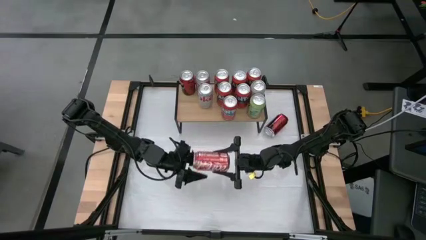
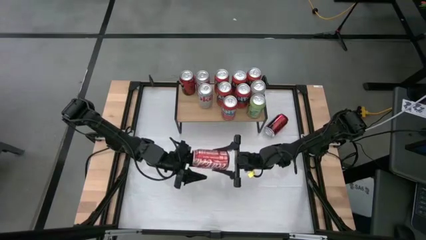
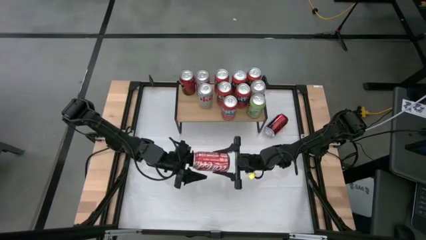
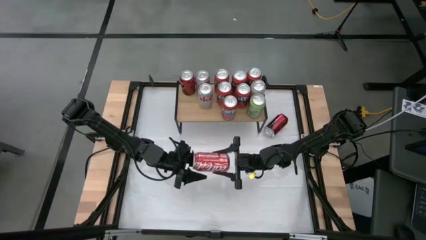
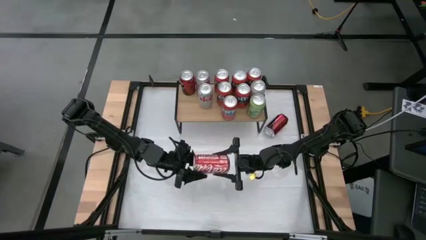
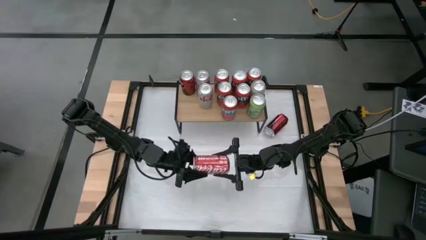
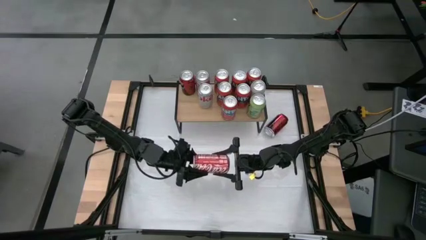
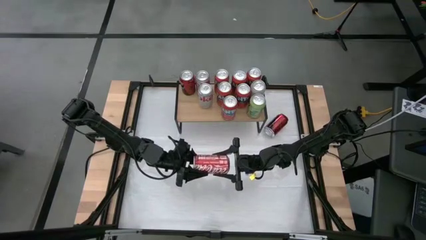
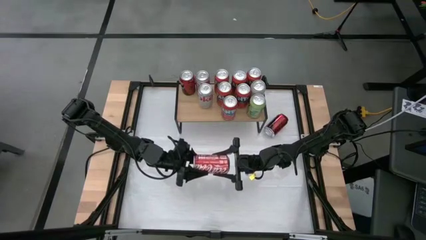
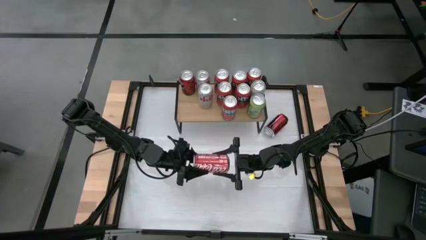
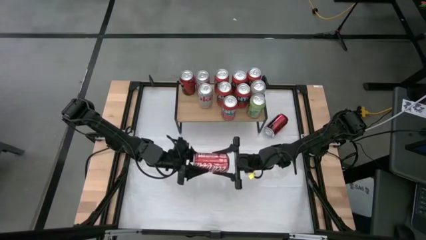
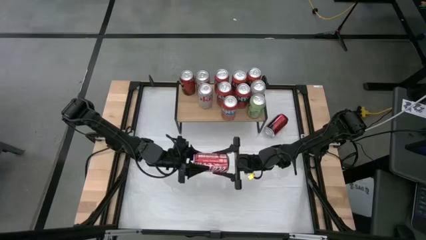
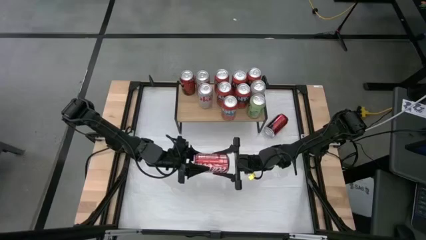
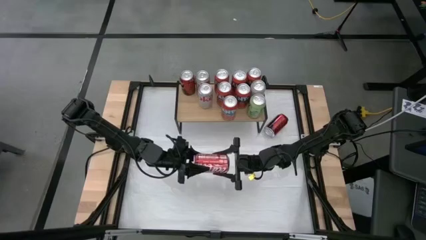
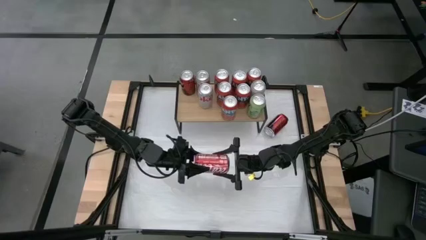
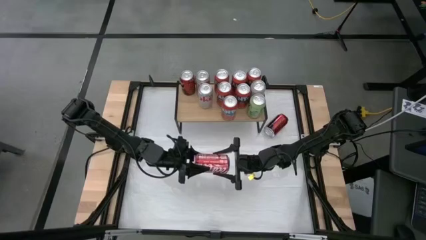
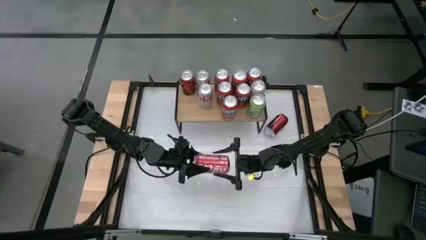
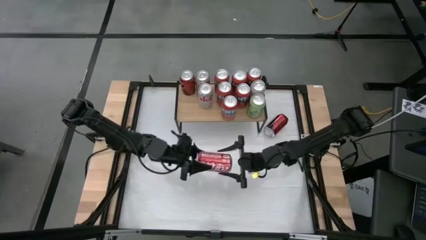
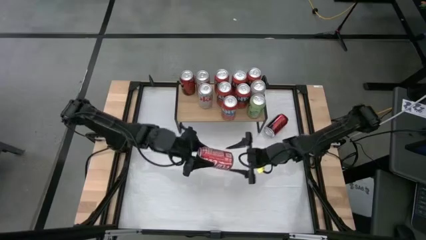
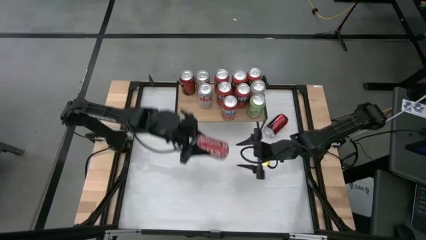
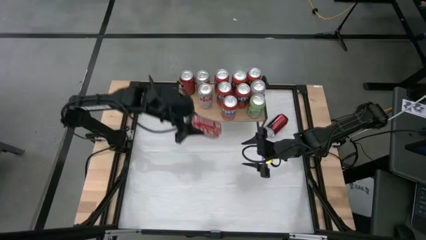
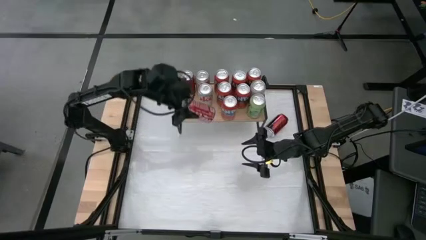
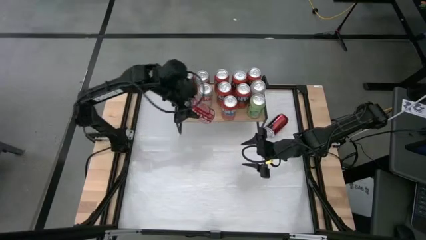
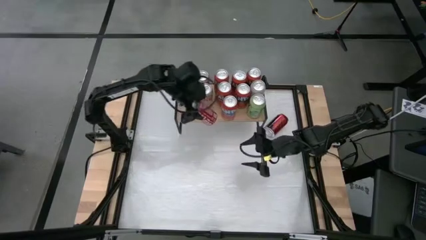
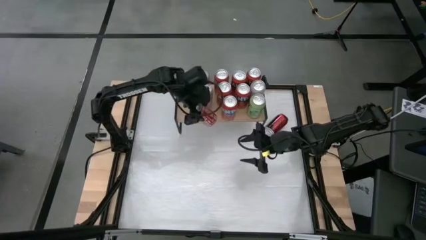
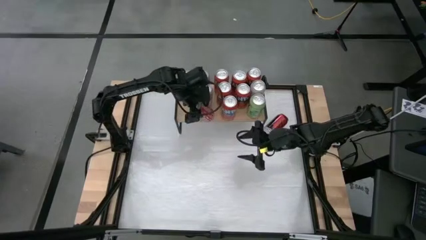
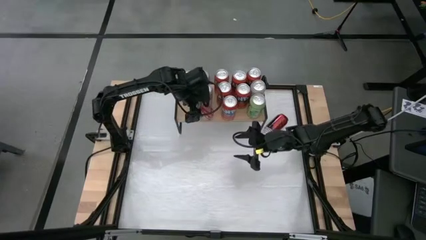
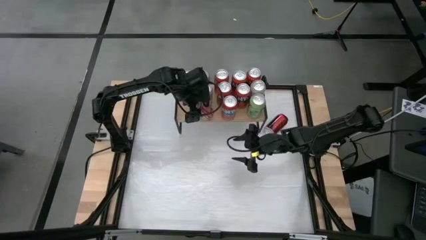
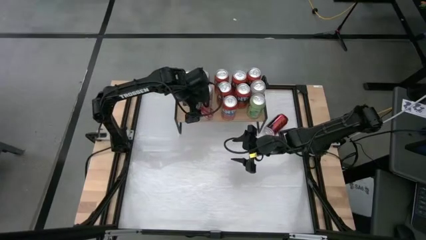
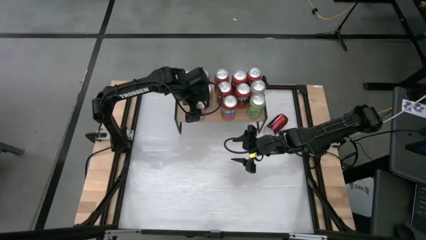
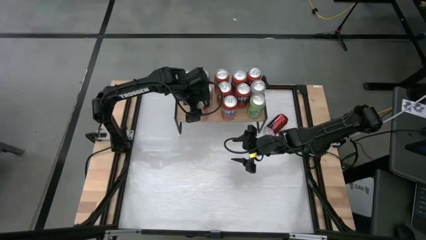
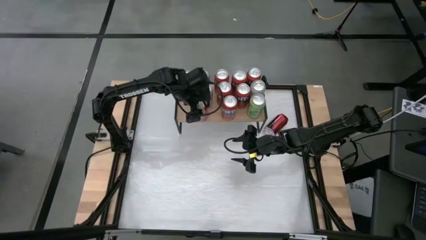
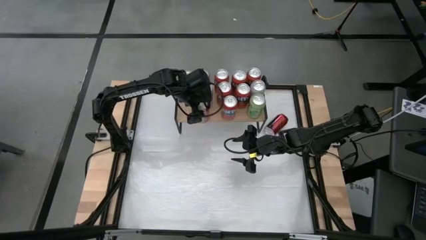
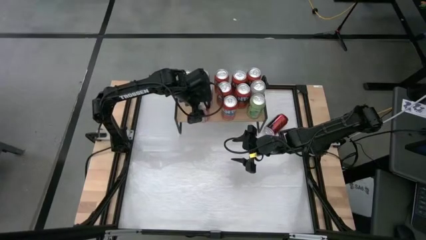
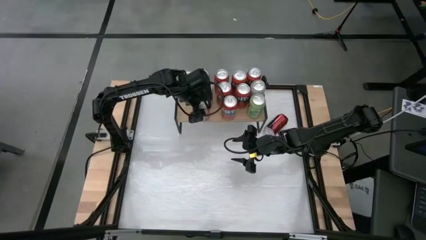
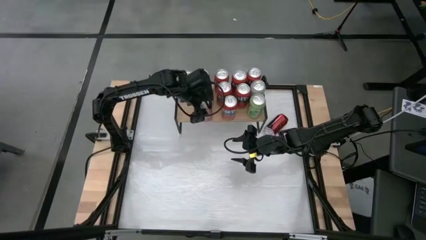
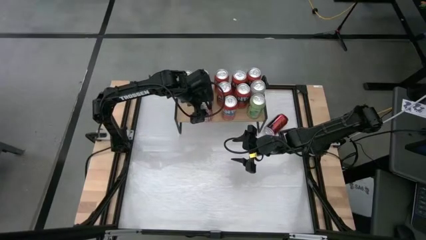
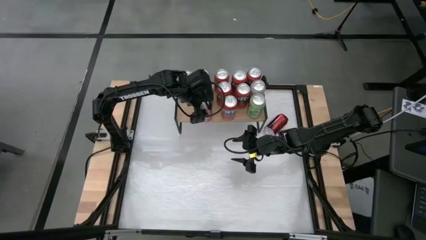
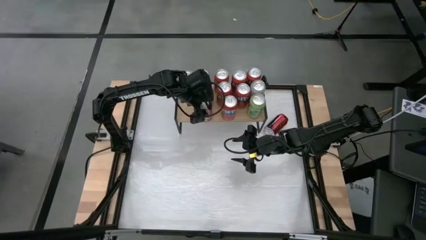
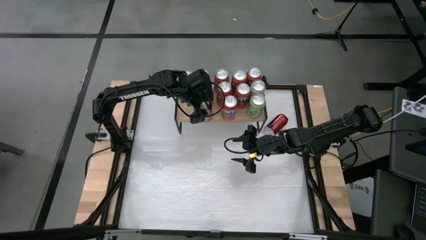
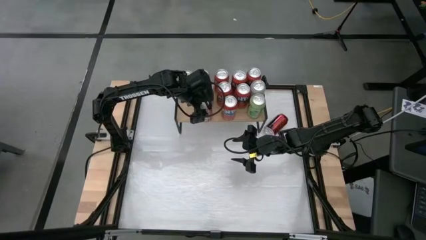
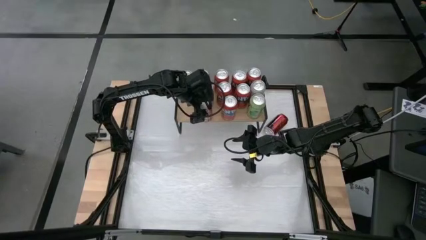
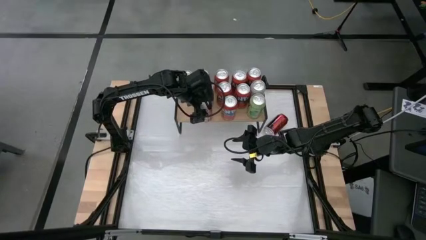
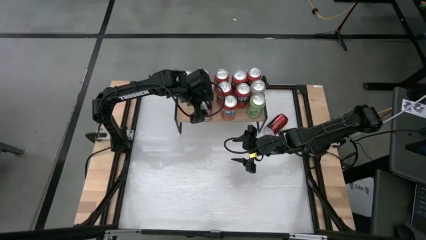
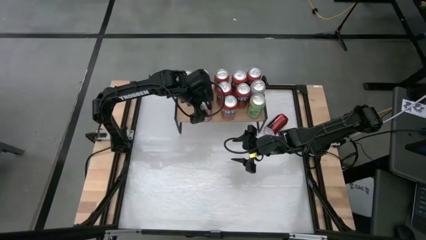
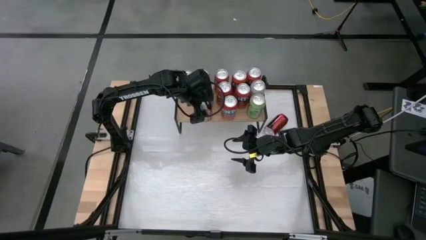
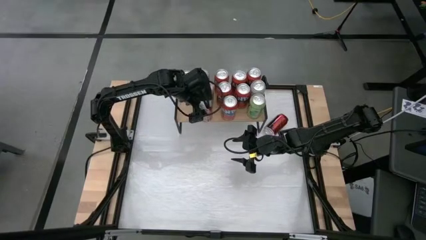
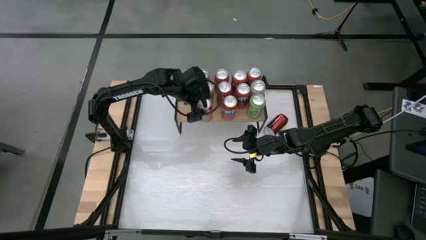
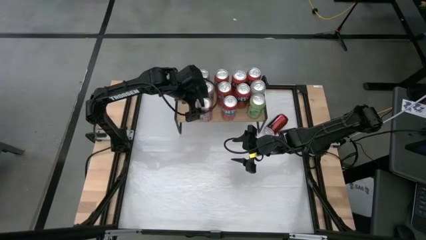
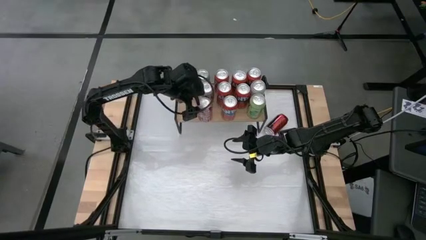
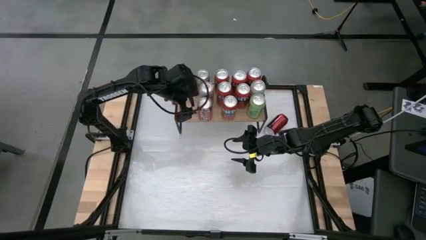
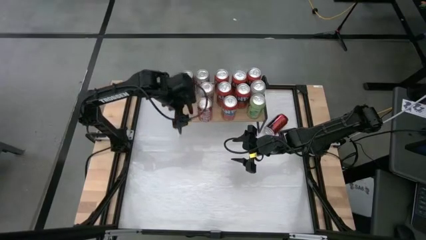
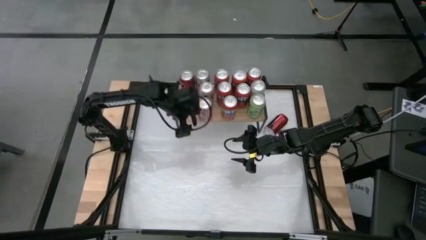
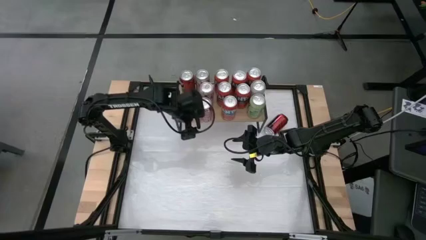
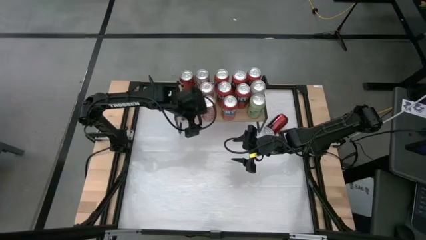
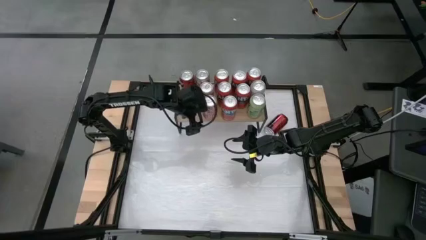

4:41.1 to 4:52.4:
Task: Place canned beverage on shelf
Put the red white soda can on the shelf aligned with the other red white soda can
